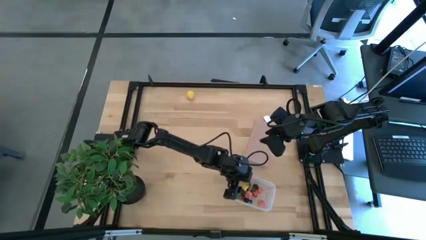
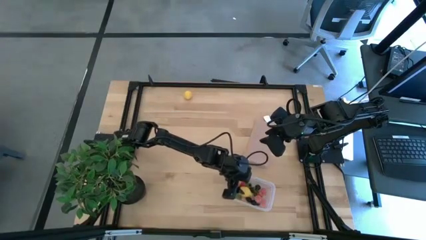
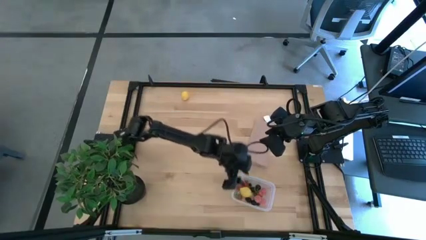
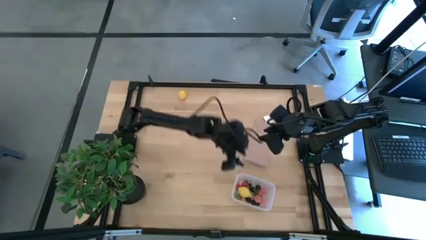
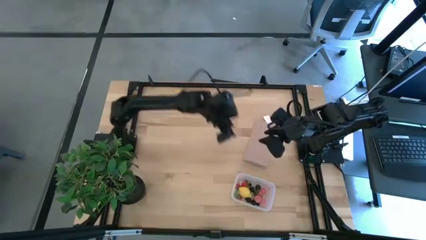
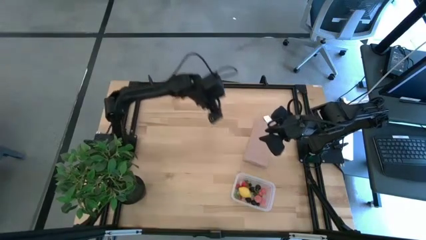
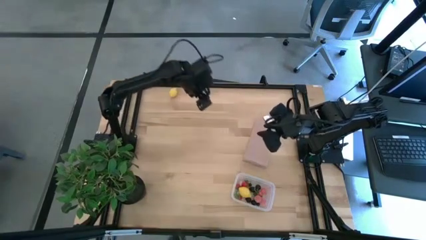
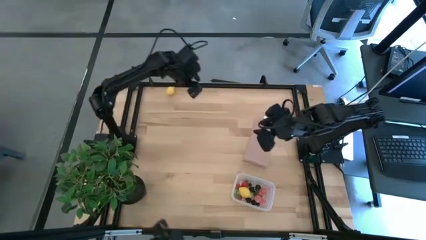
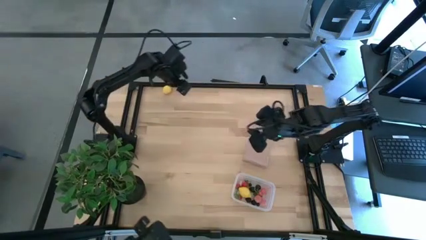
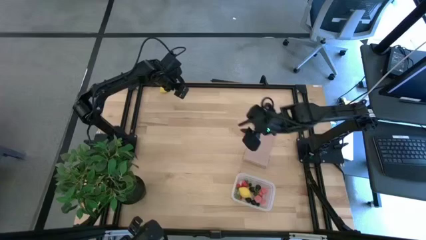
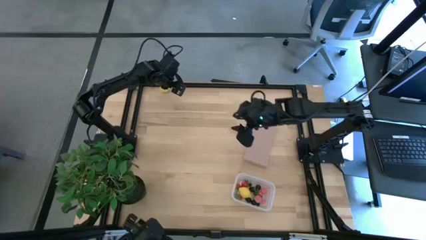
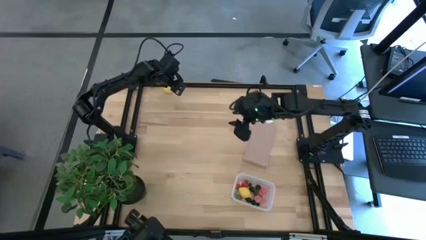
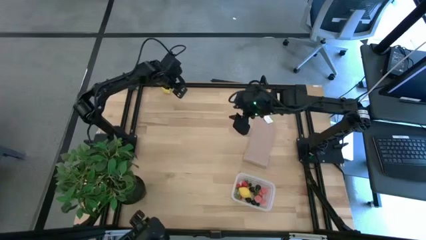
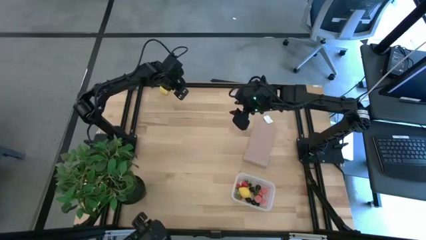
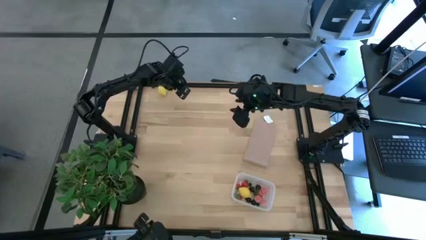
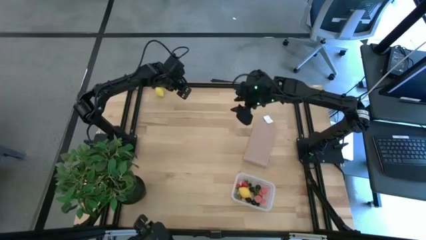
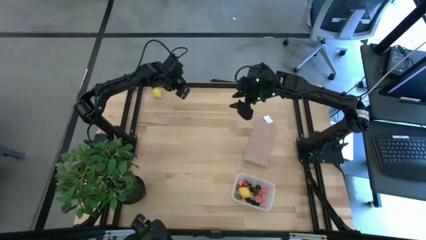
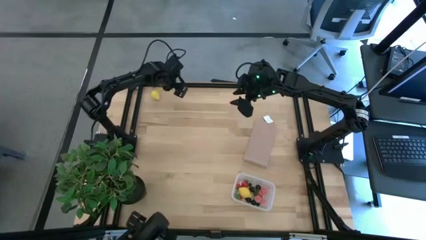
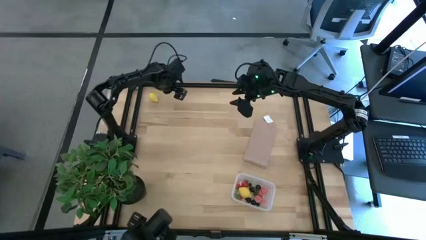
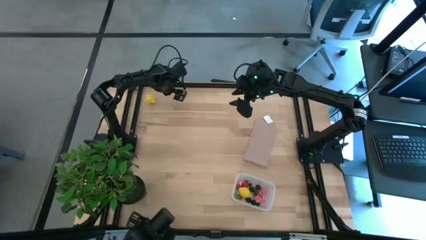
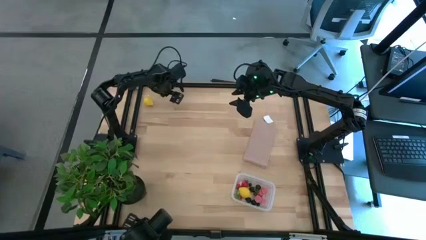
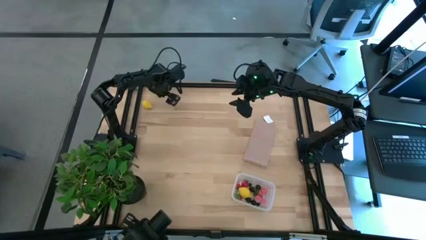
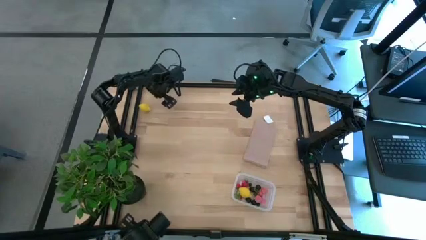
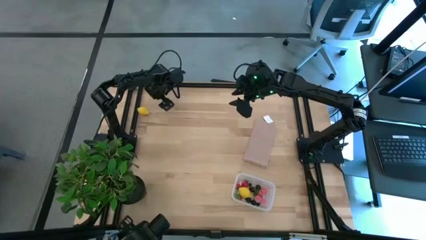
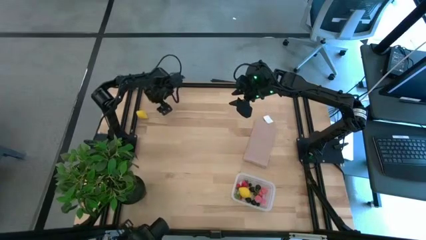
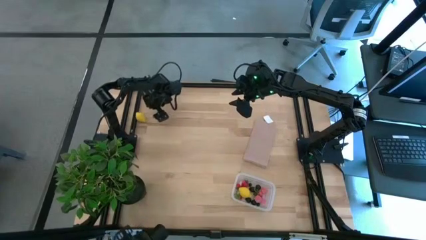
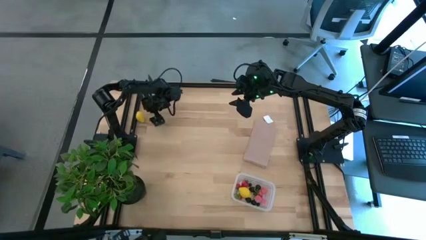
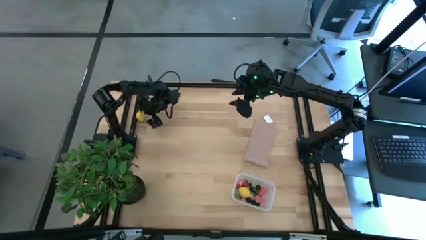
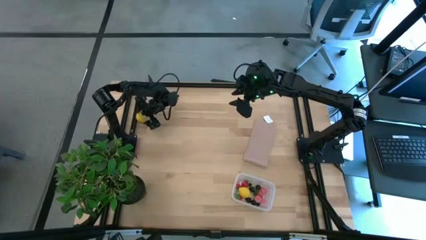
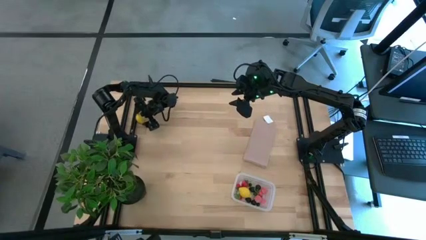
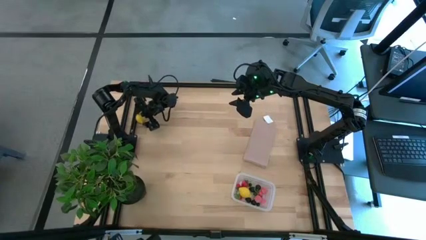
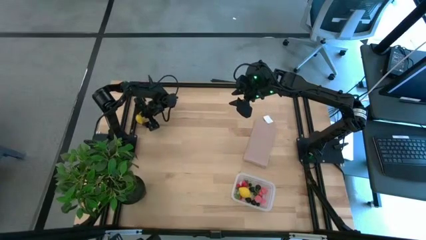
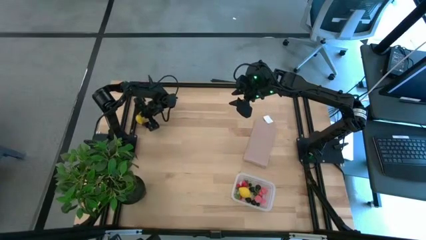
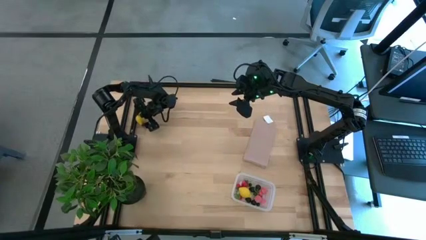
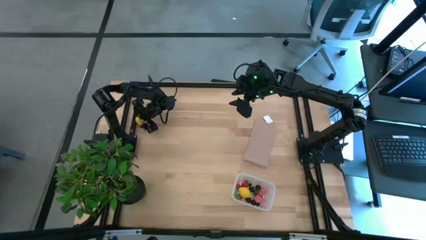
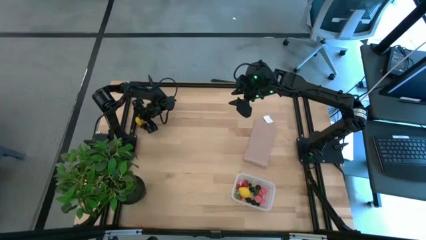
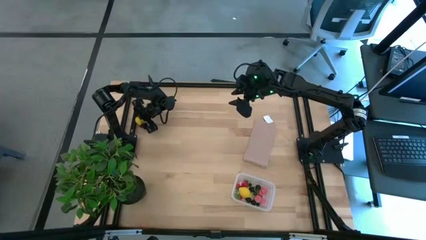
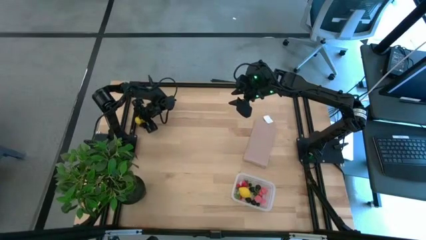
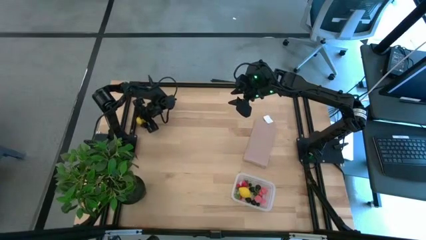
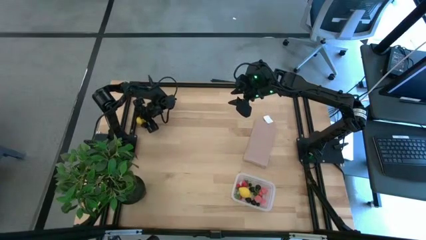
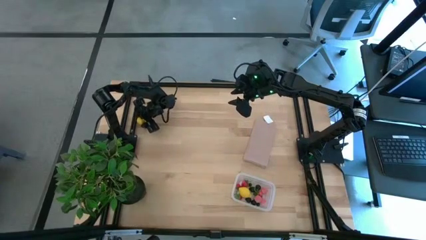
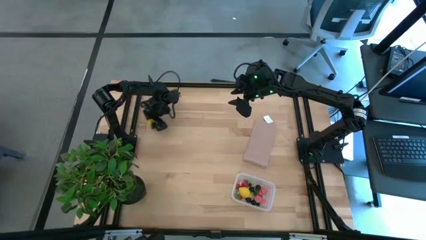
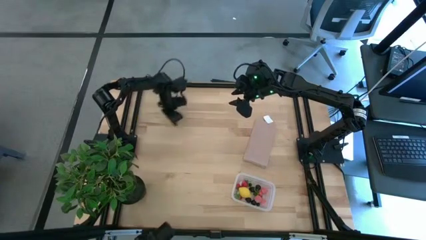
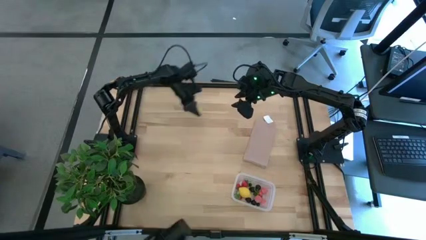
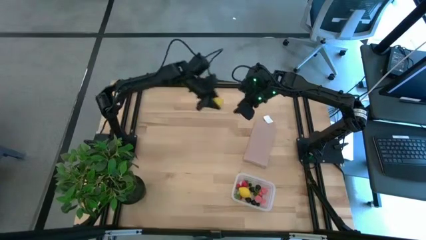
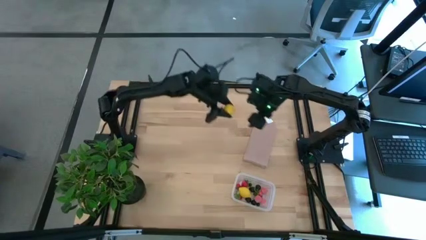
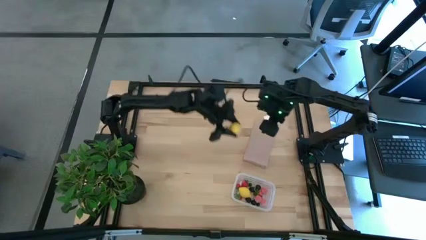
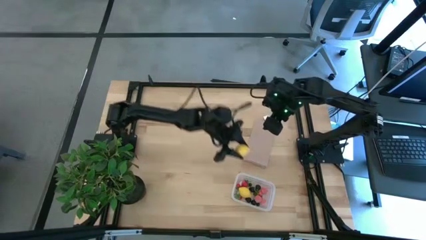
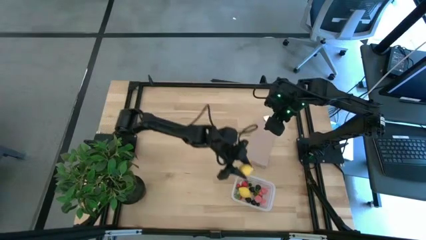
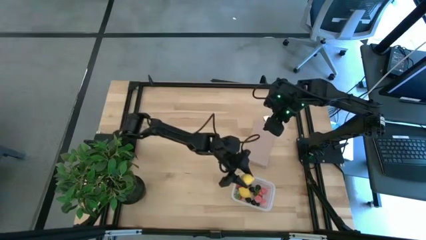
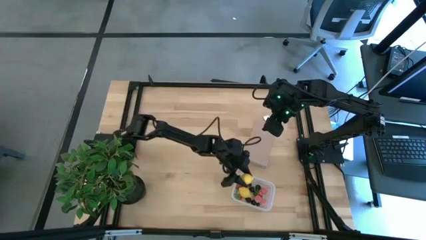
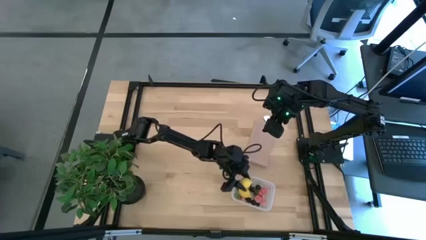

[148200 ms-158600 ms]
Task: Pick and placing Produce into tupperware
Put the lemon into the transparent container

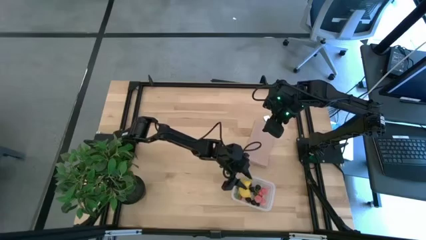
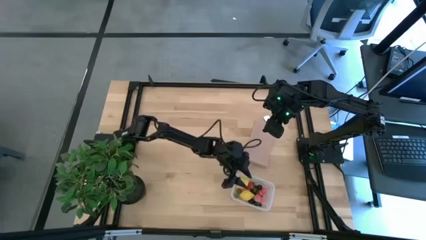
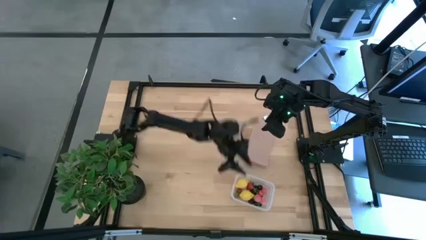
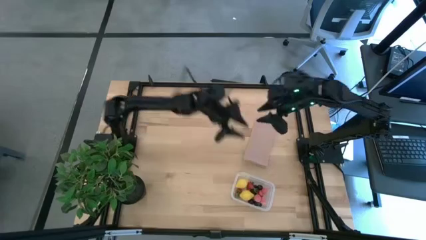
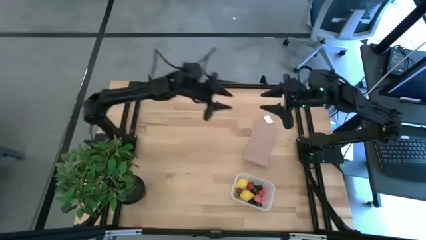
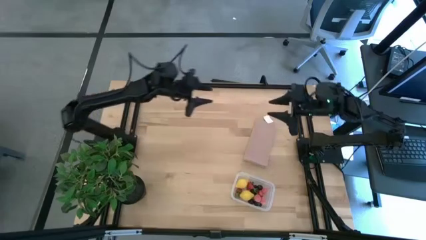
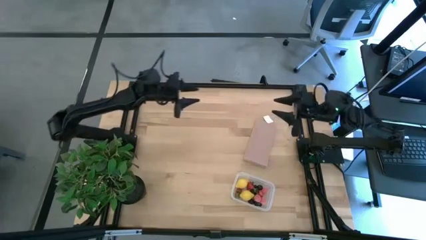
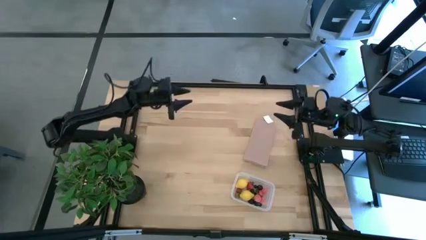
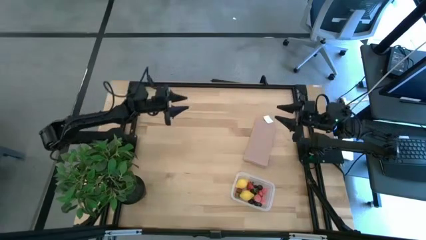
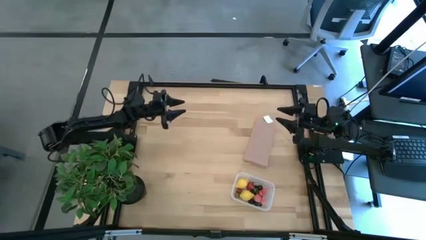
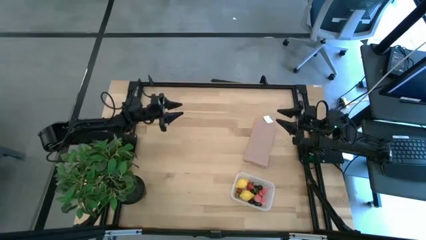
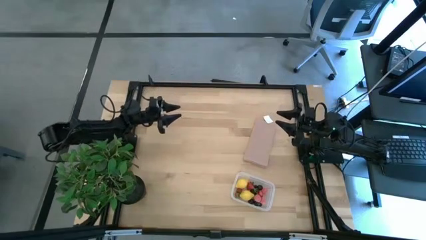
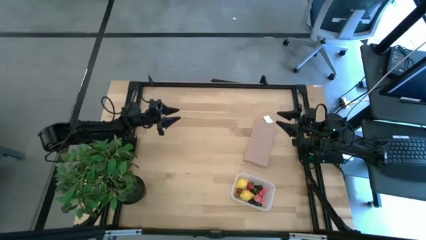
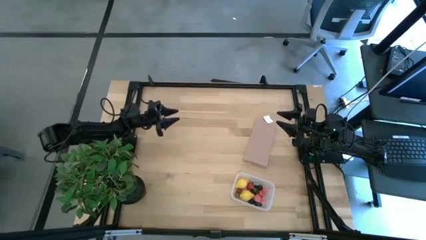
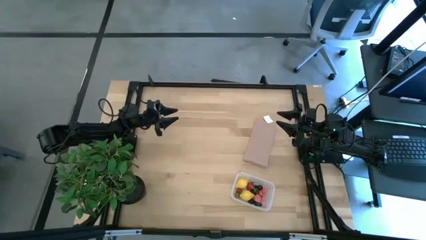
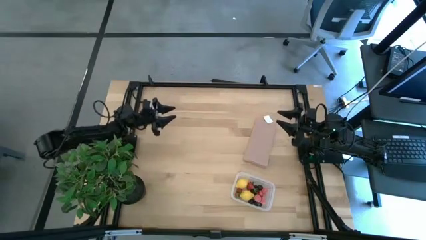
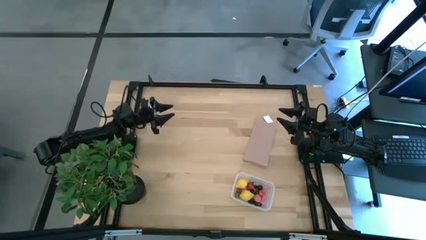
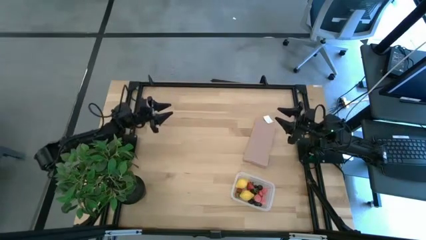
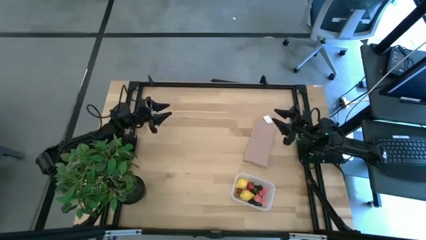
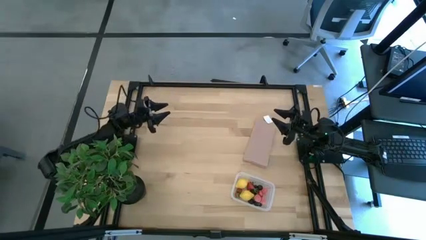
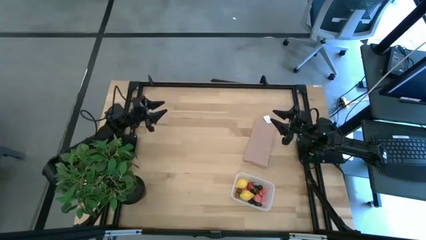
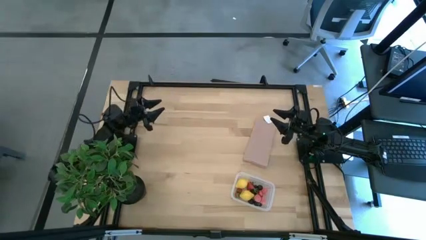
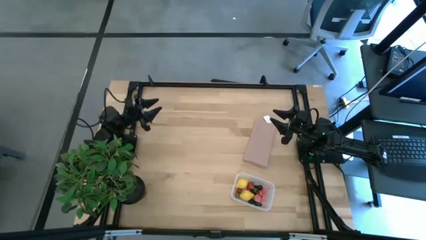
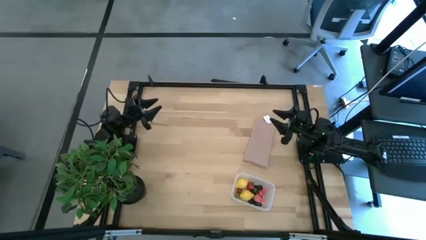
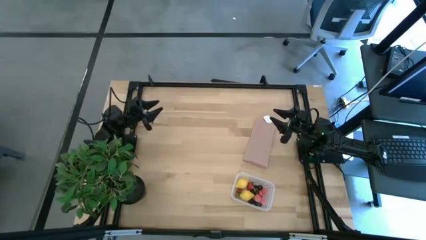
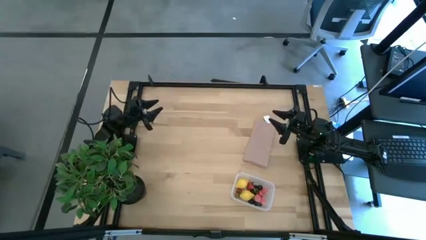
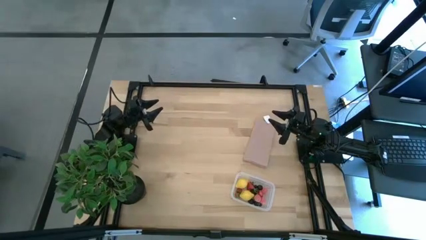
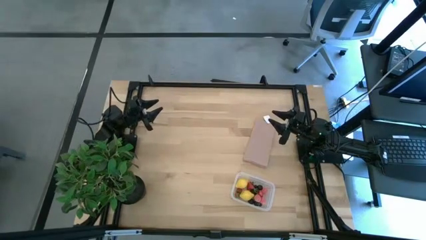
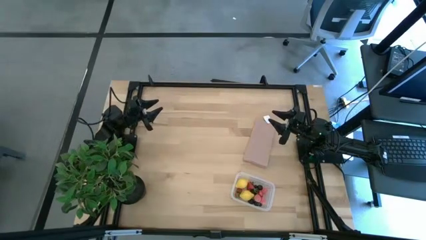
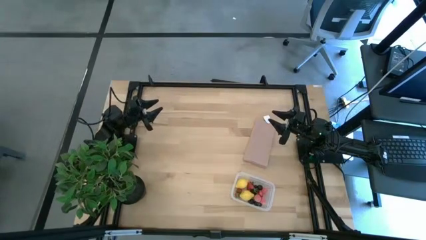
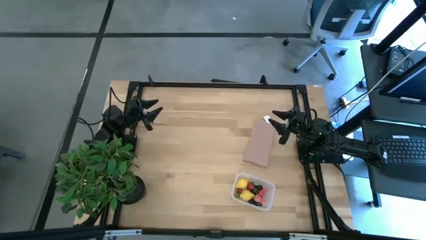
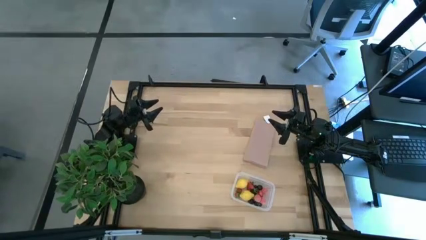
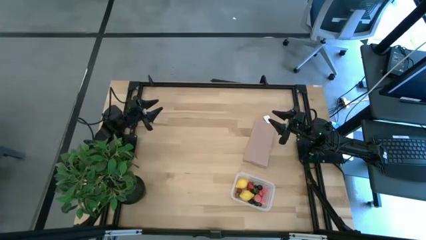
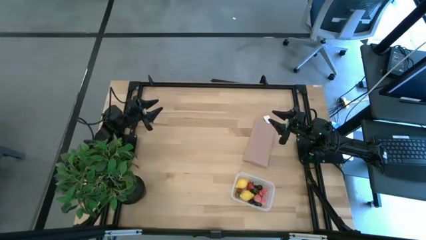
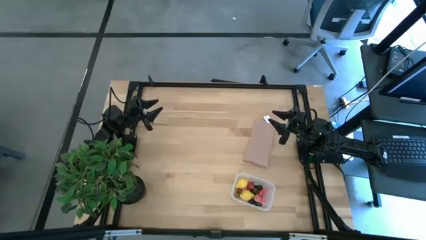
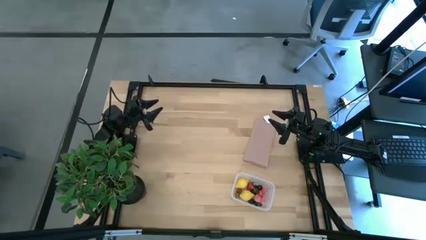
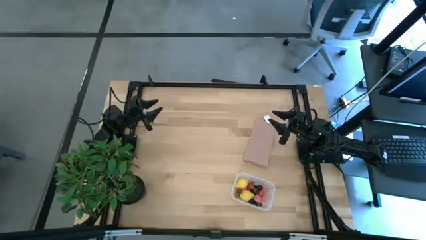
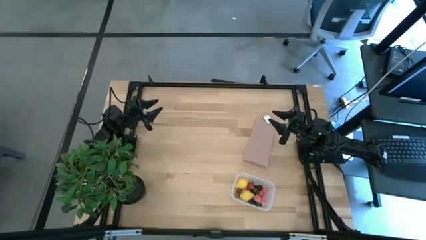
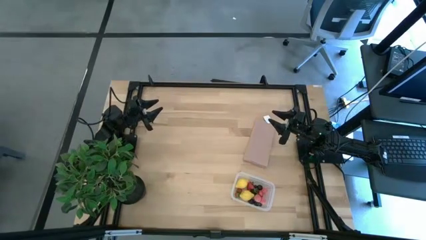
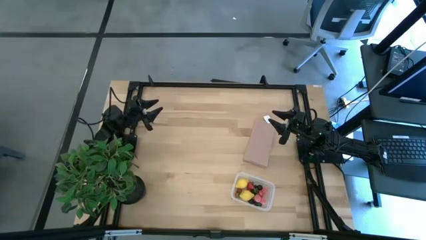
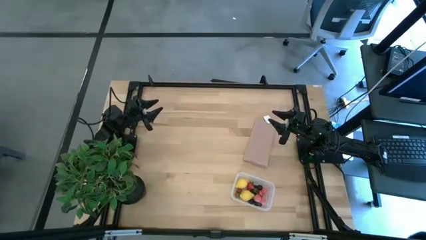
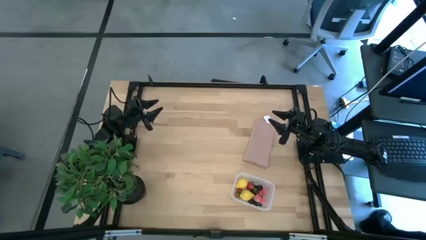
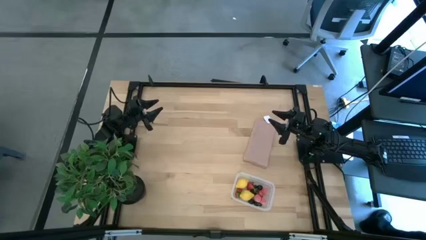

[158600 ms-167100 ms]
Return to Home Position
